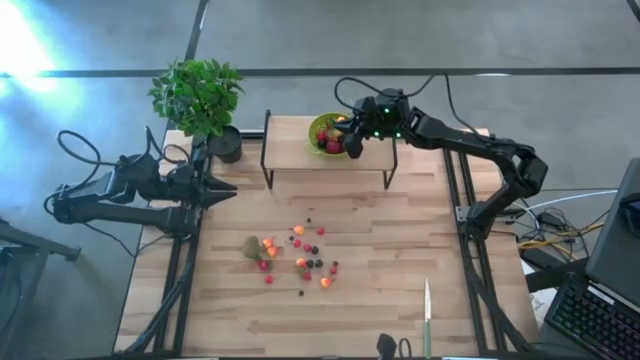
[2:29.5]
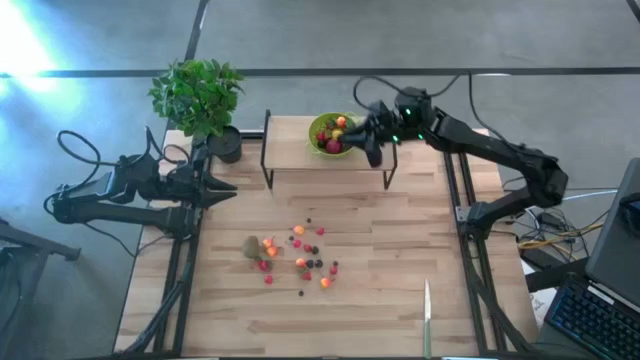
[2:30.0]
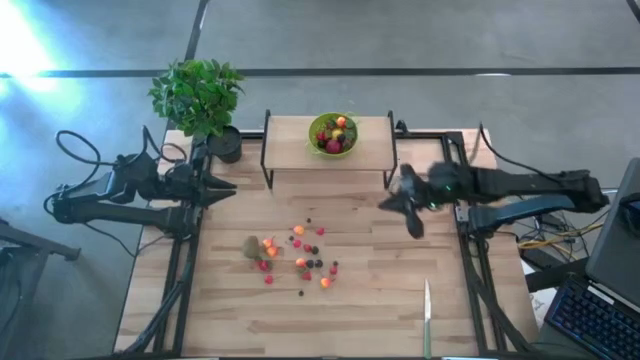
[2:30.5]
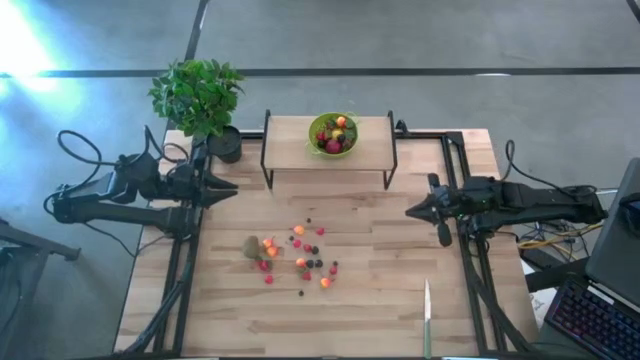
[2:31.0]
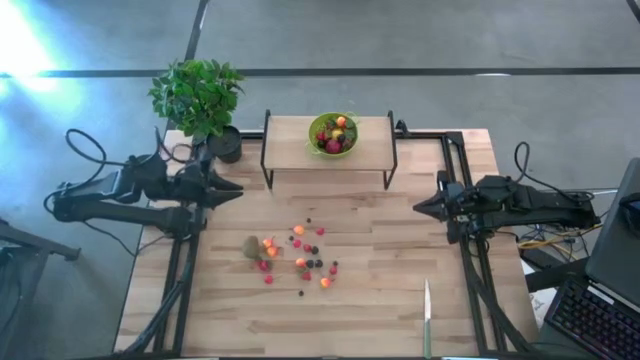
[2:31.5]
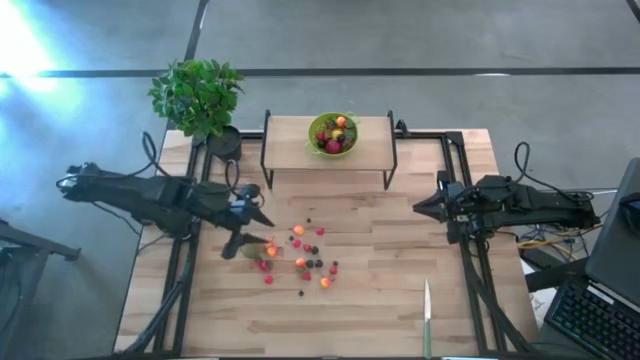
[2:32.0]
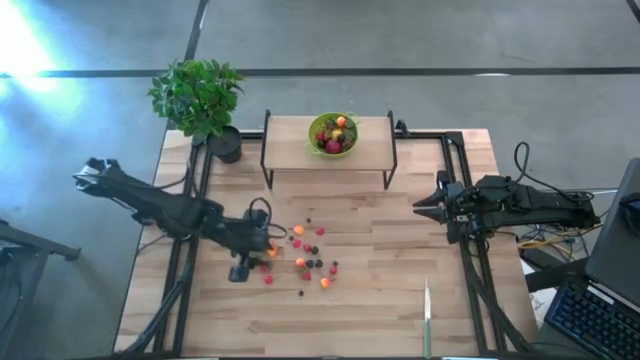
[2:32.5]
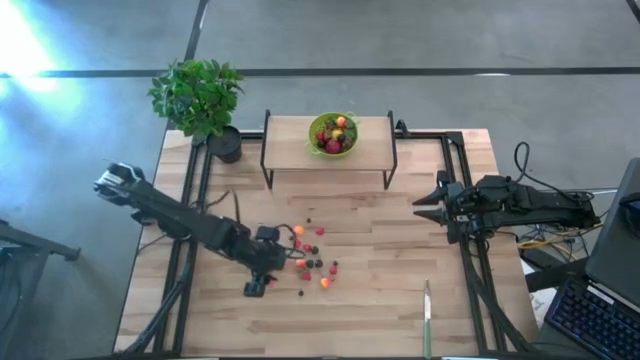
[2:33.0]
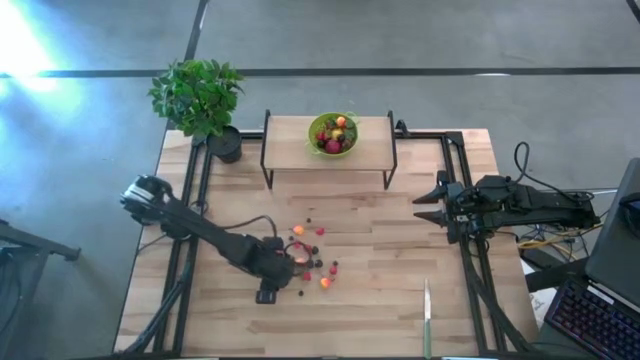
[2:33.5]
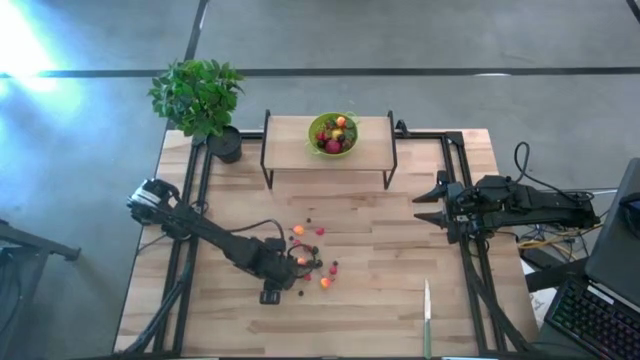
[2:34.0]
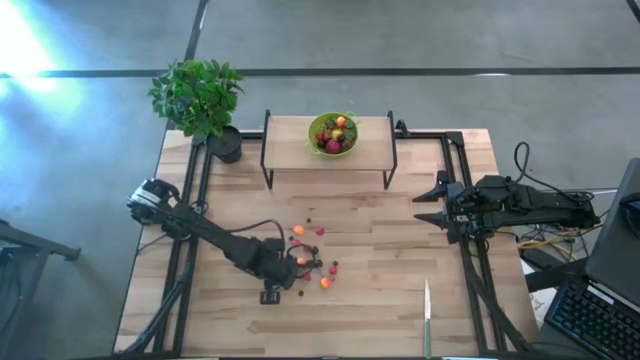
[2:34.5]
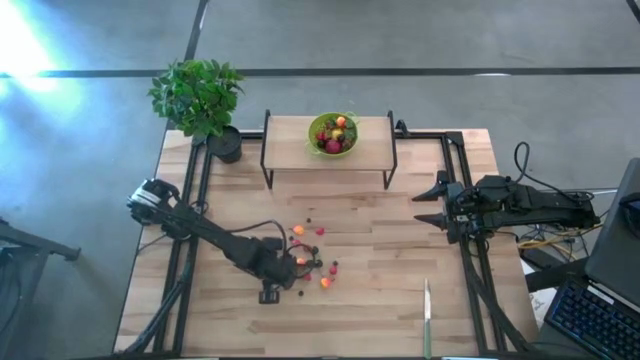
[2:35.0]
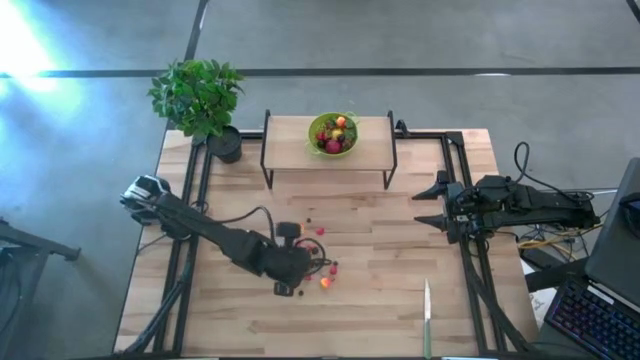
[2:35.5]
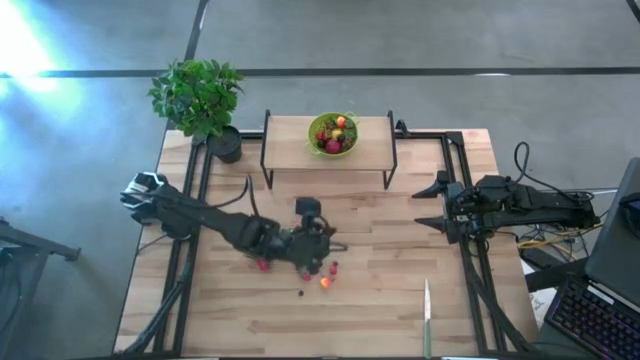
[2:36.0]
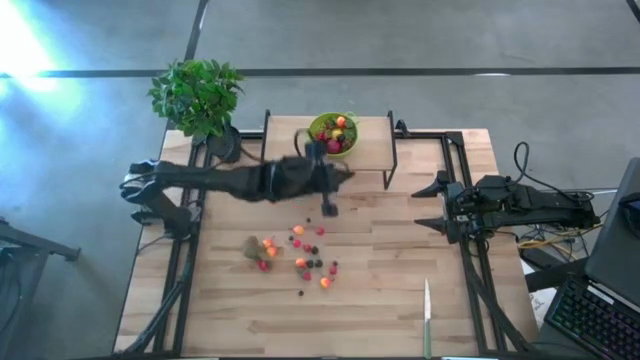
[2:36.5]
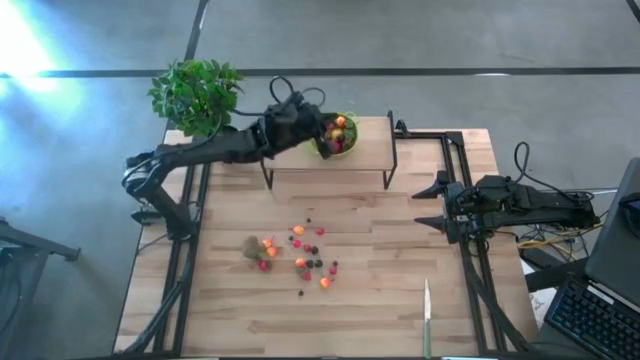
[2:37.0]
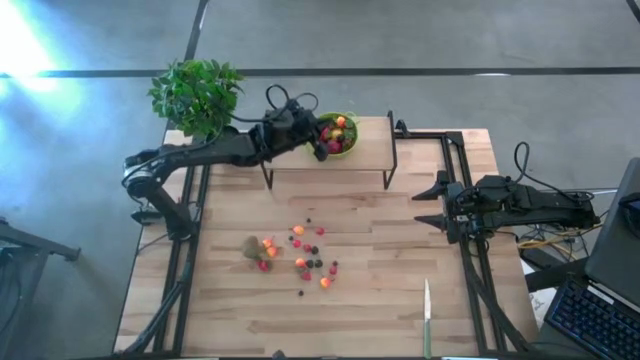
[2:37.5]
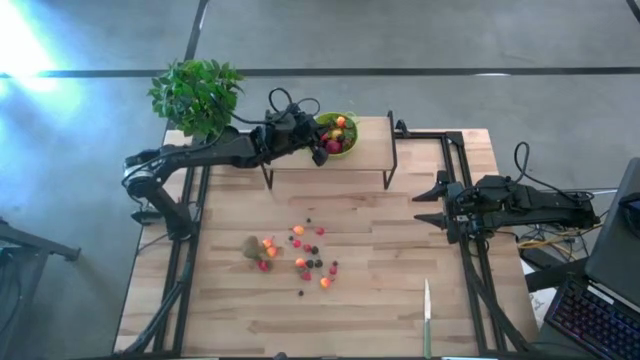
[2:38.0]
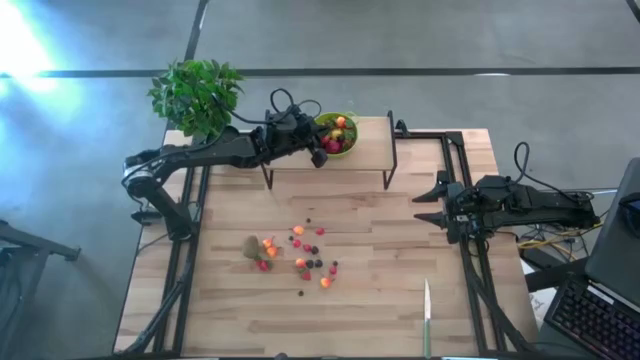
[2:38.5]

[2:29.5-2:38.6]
Task: Pick & Place Fruit
Put the red cherry into the green strainer bowl on the shelf

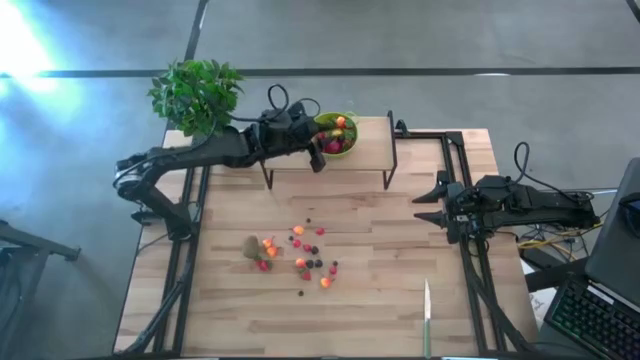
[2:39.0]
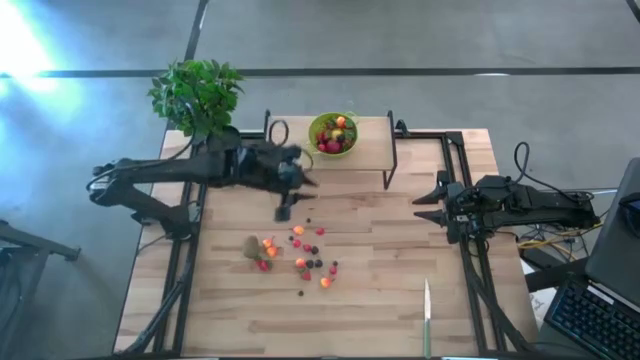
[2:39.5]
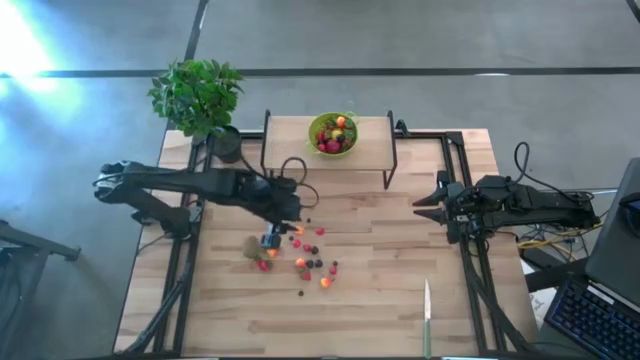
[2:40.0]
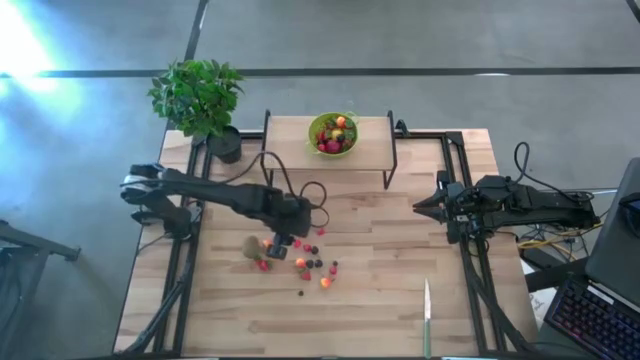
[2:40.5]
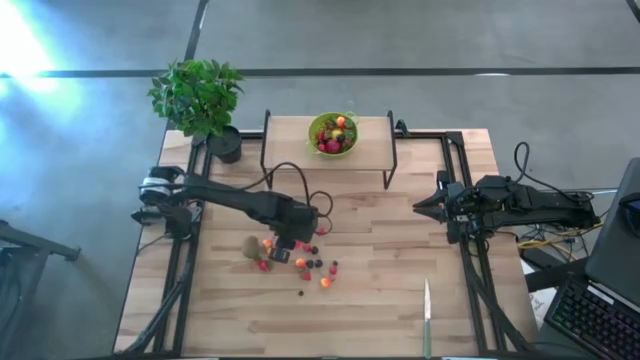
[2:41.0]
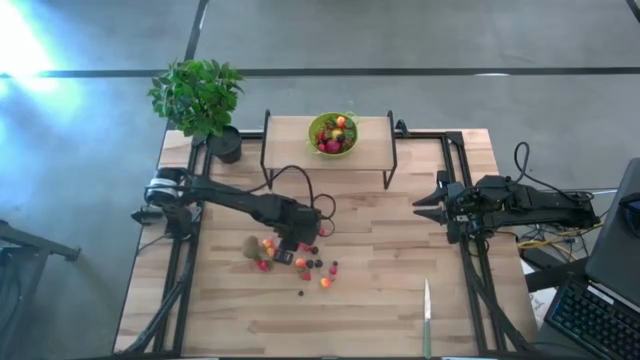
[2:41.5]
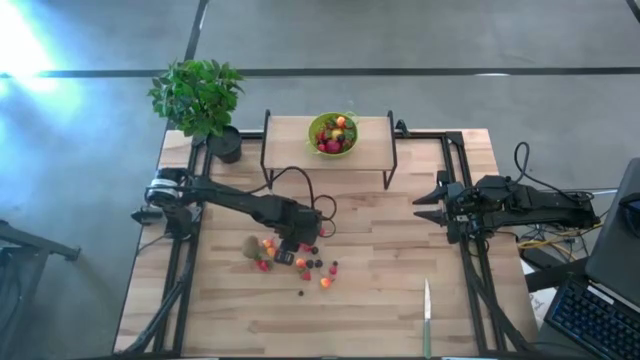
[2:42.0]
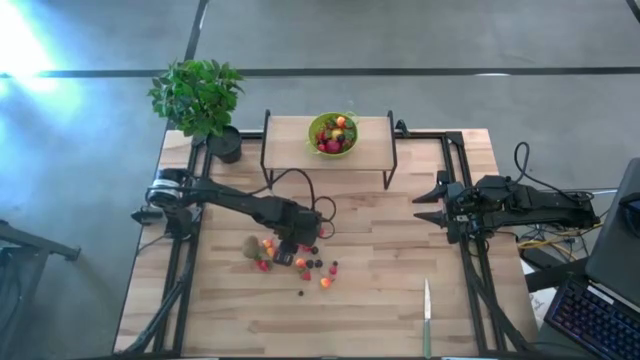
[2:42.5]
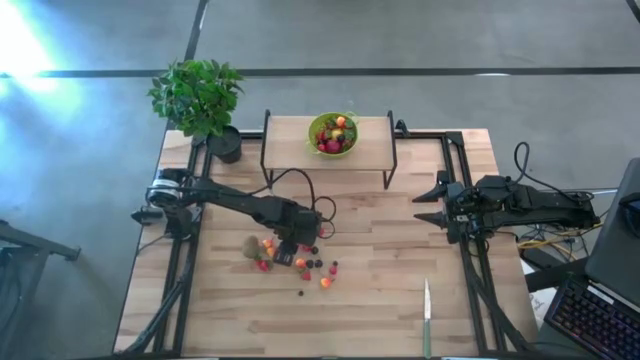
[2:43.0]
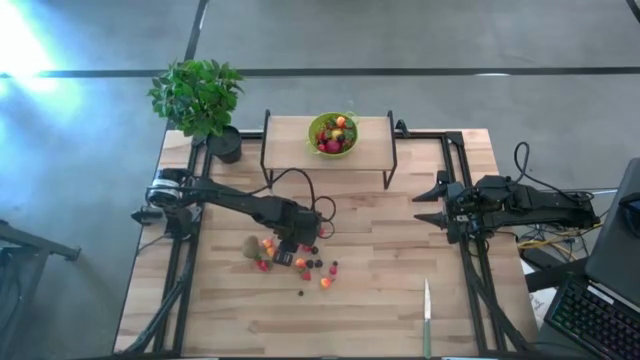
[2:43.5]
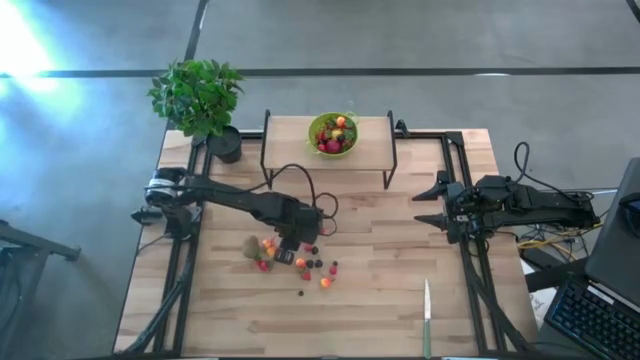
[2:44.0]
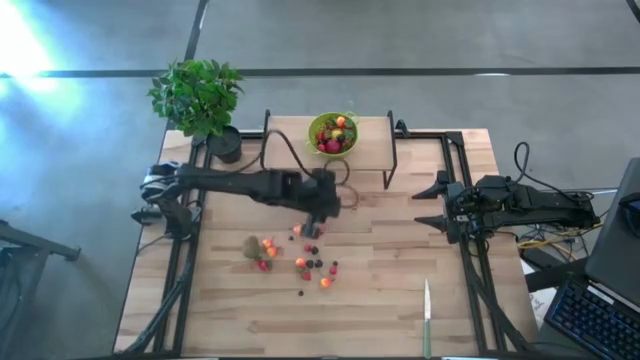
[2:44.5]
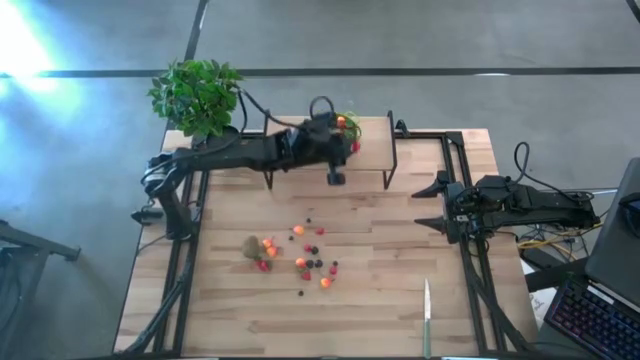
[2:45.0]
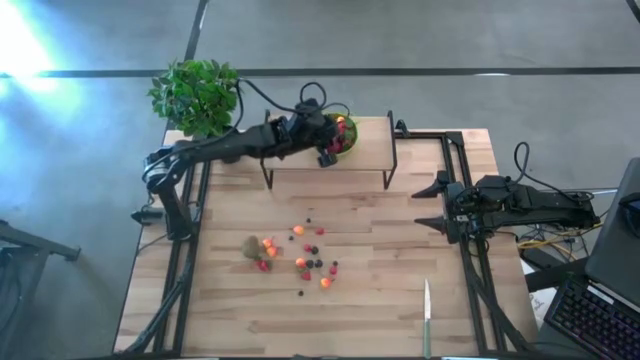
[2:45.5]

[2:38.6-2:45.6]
Put the red cherry into the green strainer bowl on the shelf

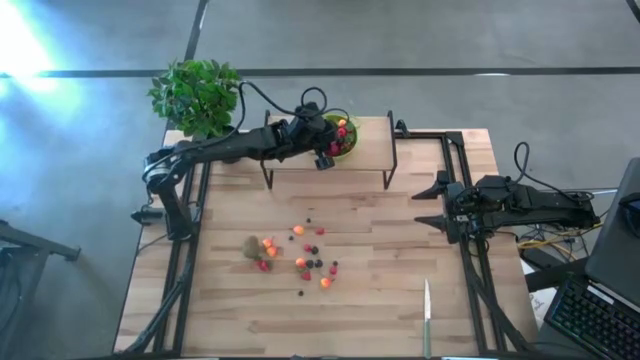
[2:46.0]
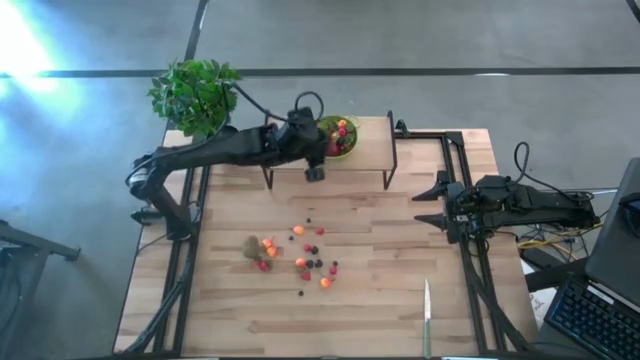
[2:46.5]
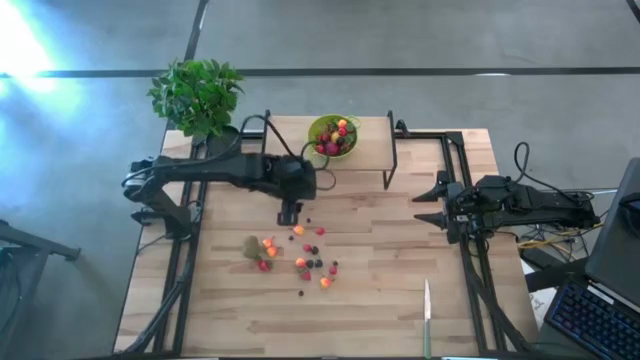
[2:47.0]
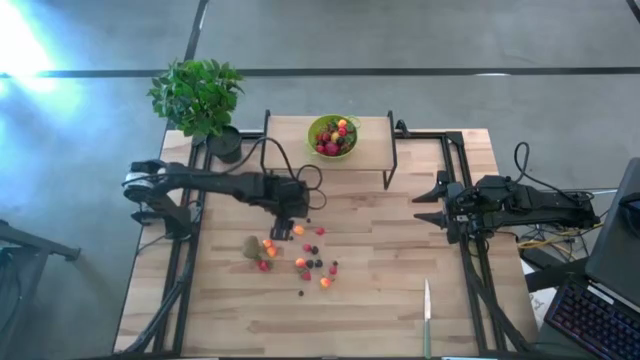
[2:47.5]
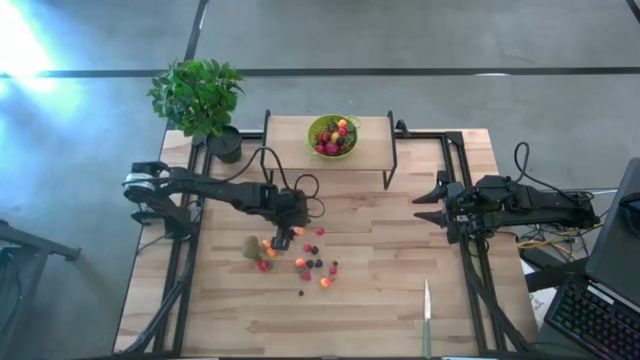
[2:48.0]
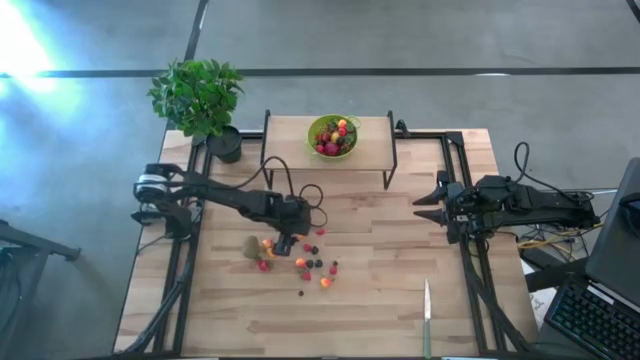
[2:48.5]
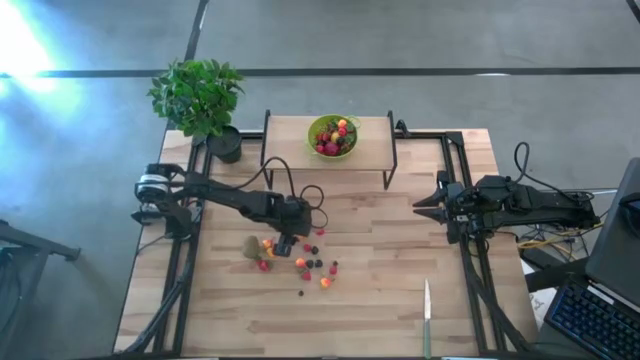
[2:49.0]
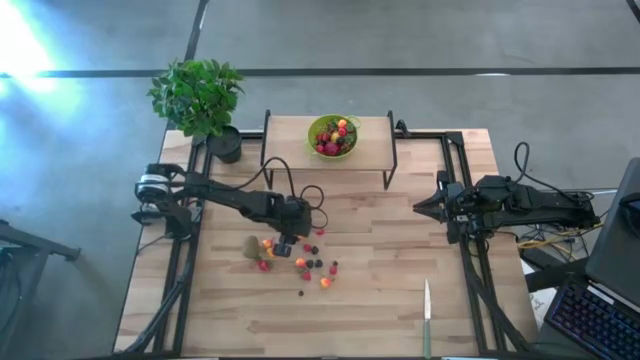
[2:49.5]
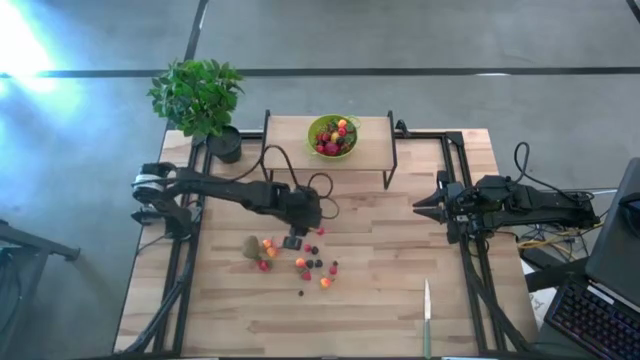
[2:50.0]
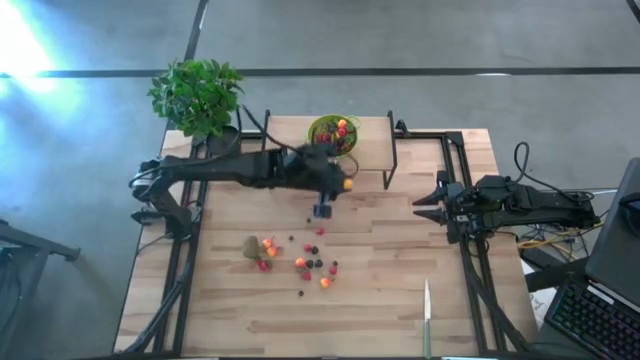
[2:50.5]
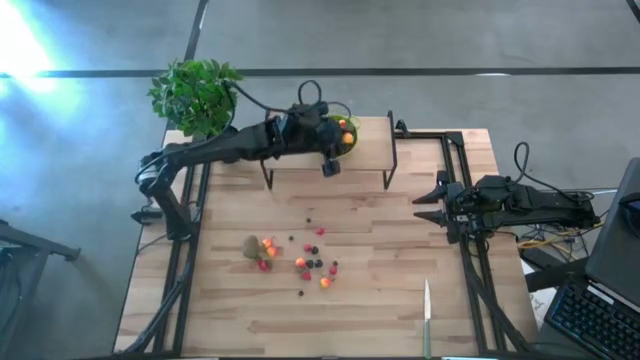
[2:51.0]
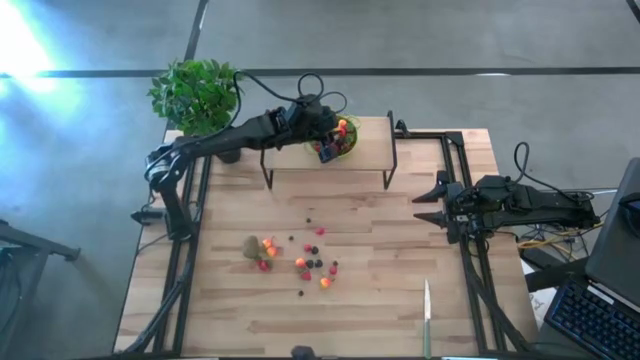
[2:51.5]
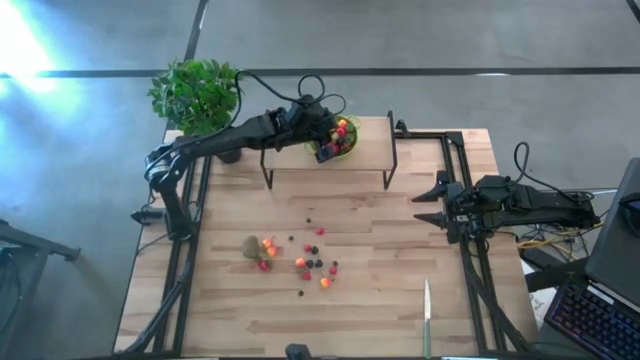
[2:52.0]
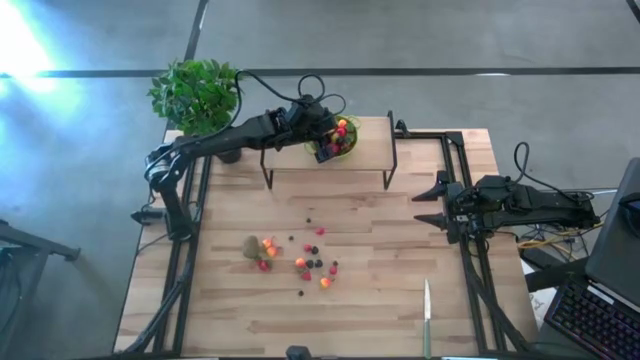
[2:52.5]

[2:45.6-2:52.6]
Put the yellow peach into the green strainer bowl on the shelf
